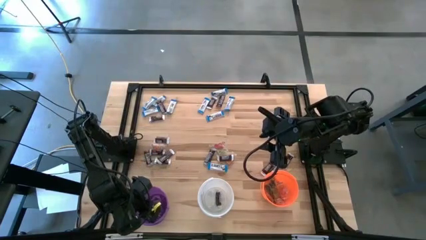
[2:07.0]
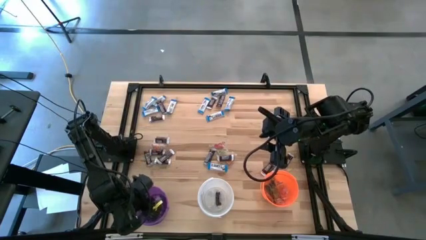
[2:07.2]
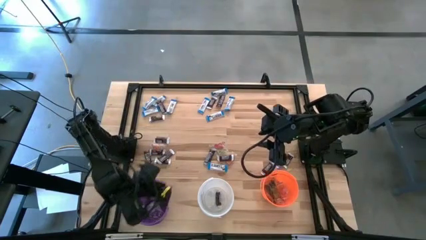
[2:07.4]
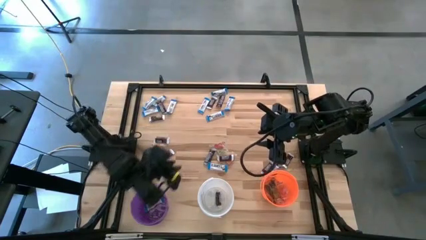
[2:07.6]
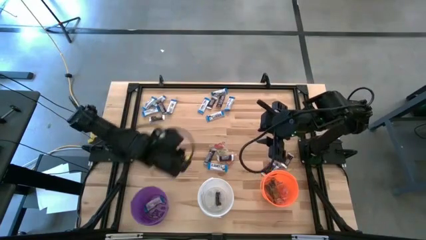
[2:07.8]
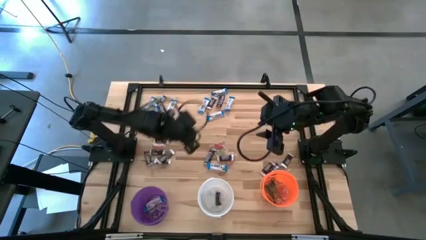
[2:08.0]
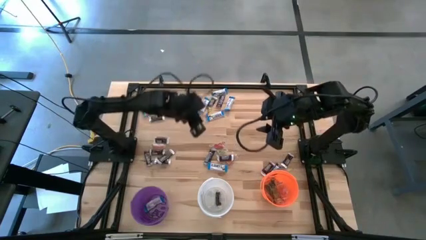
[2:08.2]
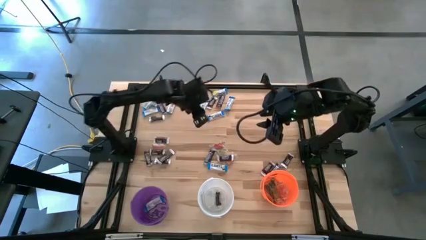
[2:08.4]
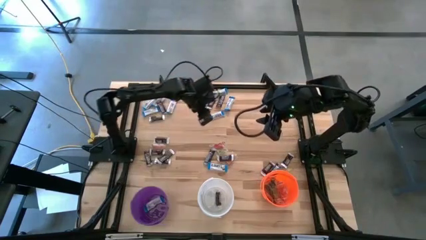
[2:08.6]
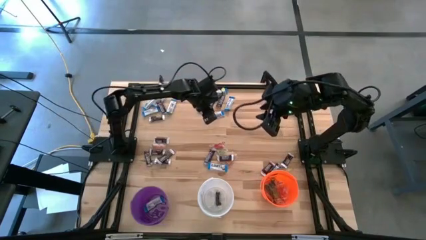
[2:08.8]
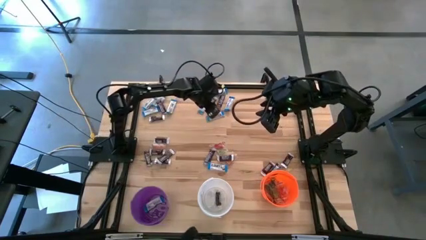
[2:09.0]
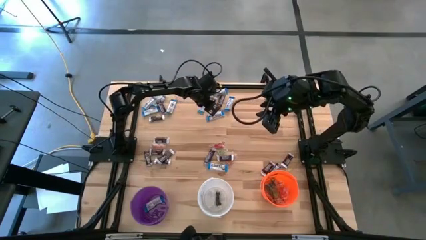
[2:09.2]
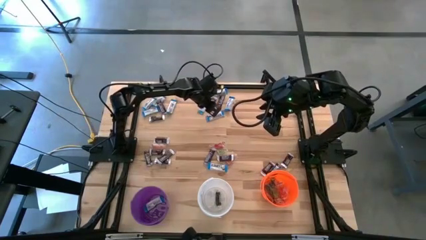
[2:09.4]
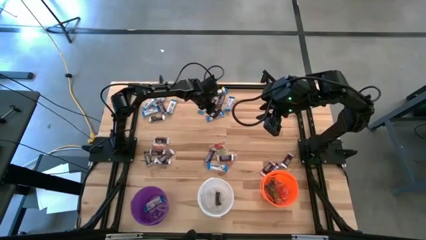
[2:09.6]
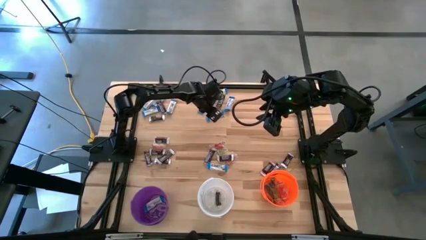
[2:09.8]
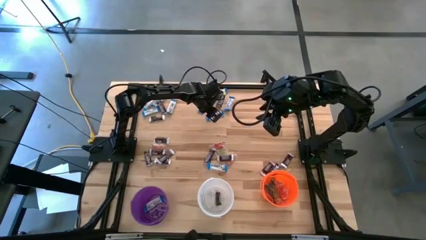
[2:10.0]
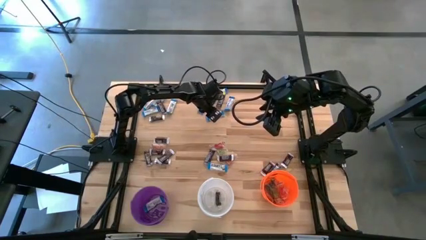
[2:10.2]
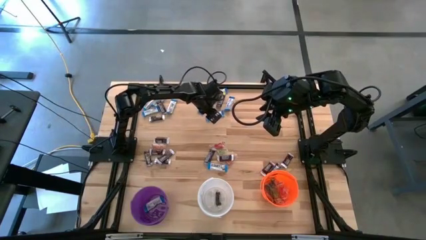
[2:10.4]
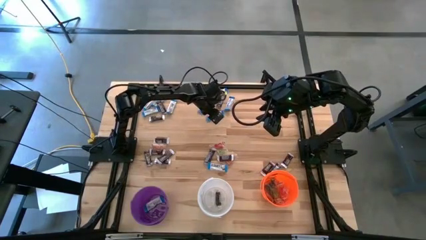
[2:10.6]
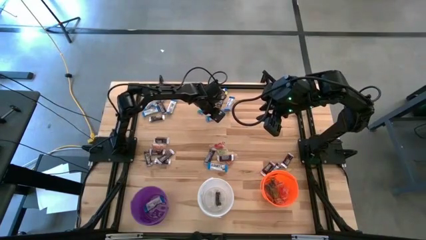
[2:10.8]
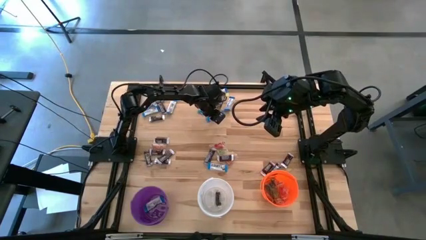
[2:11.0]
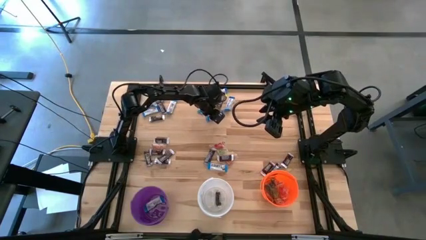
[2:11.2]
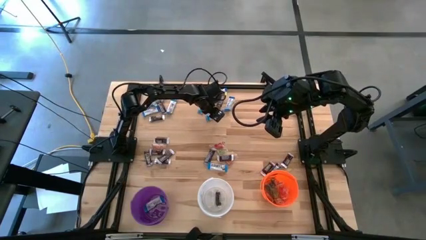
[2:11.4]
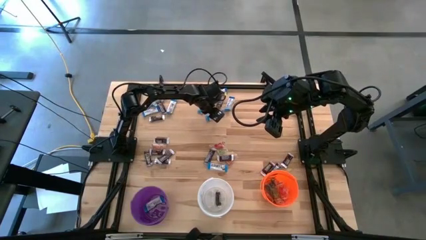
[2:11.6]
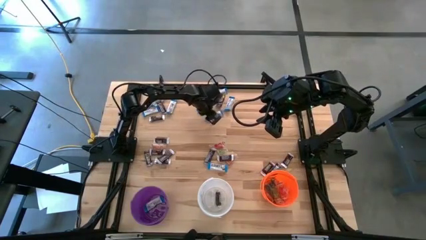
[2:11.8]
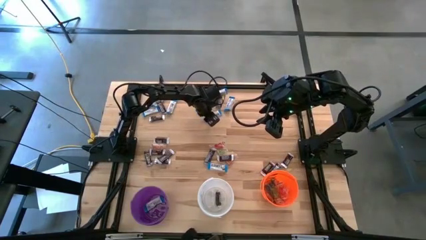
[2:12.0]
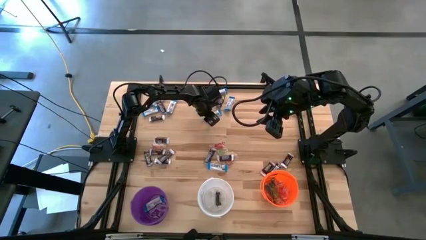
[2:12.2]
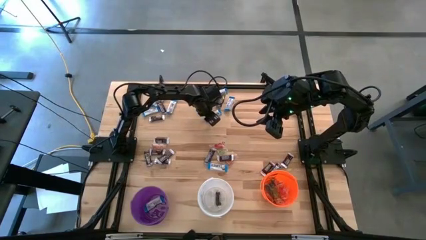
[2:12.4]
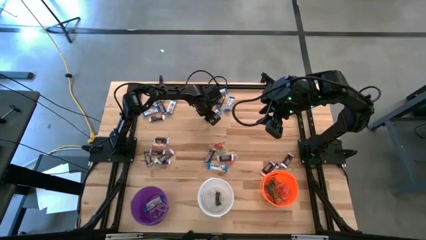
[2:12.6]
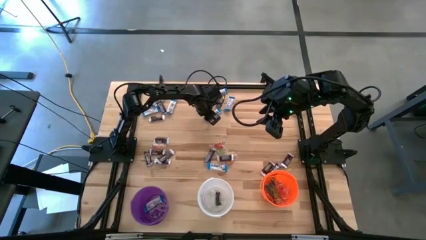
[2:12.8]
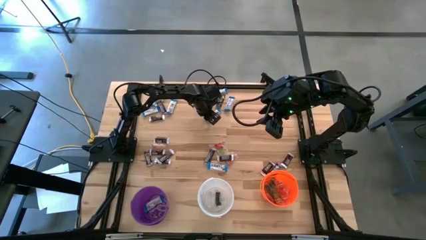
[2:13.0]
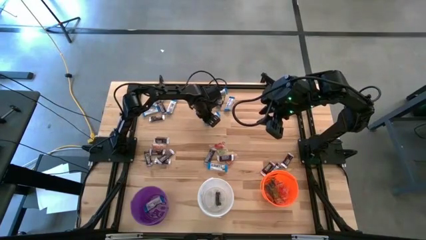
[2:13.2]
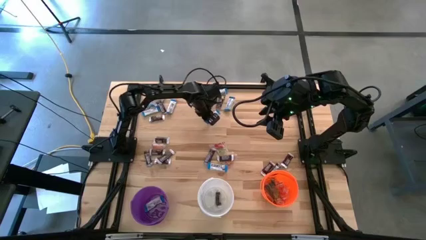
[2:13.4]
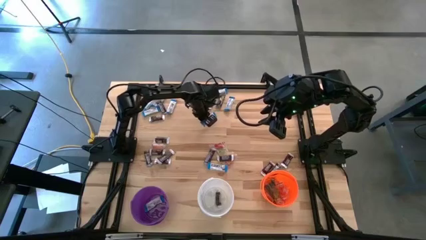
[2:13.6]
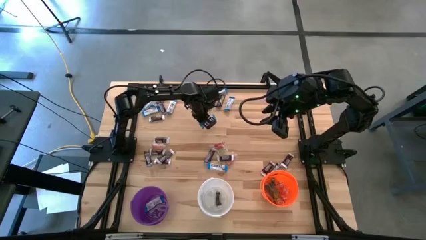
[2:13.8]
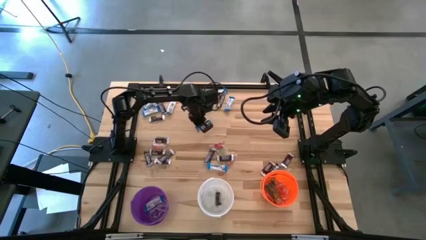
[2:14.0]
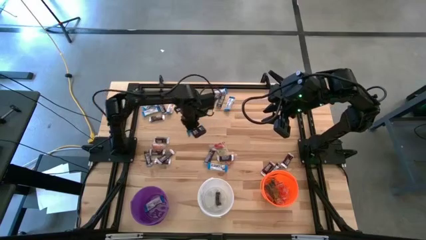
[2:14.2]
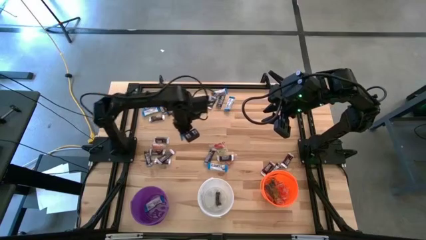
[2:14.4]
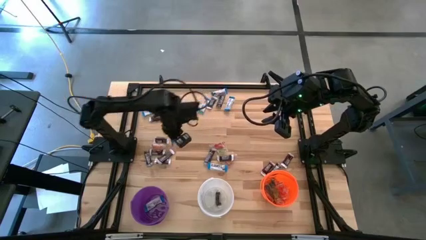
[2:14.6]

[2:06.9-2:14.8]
Task: Sort candy
Put the white chocolate into the violet bucket

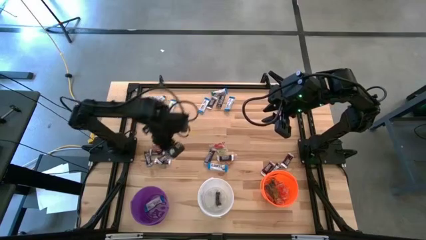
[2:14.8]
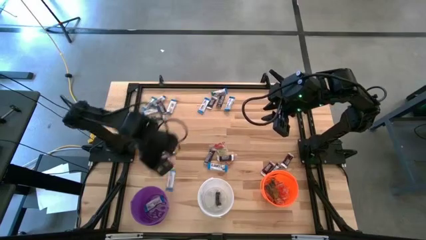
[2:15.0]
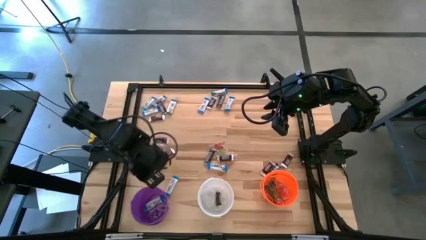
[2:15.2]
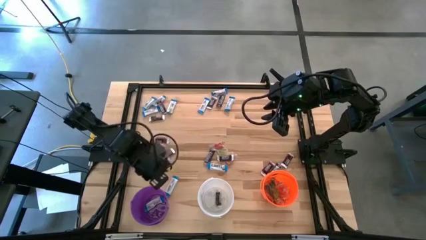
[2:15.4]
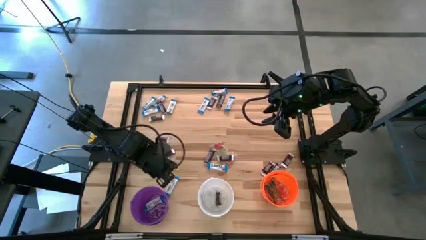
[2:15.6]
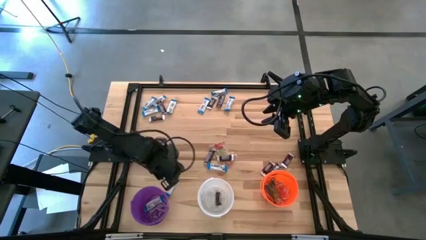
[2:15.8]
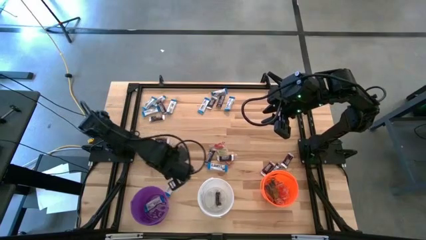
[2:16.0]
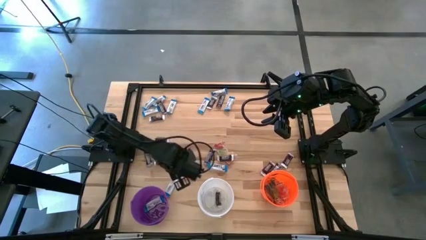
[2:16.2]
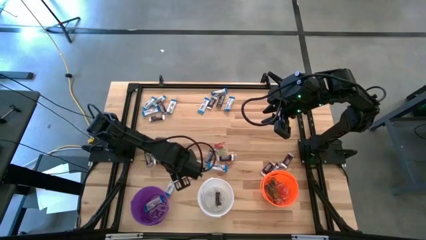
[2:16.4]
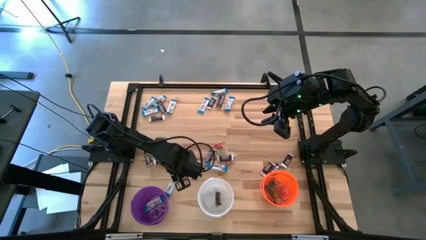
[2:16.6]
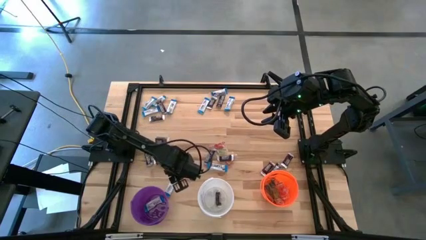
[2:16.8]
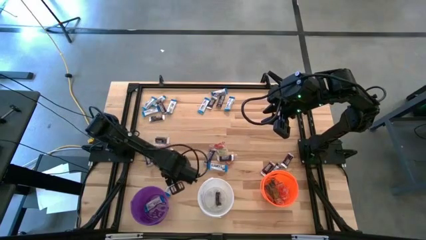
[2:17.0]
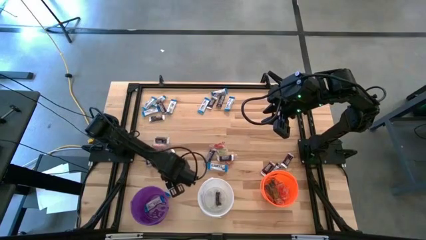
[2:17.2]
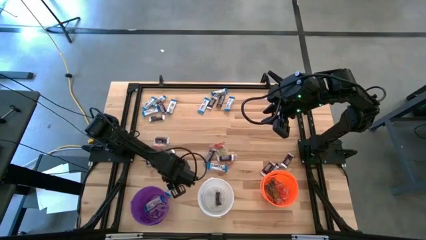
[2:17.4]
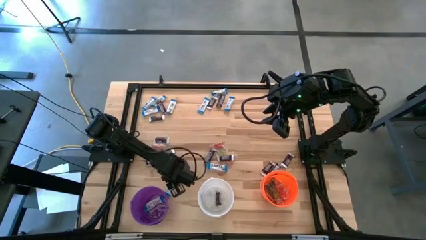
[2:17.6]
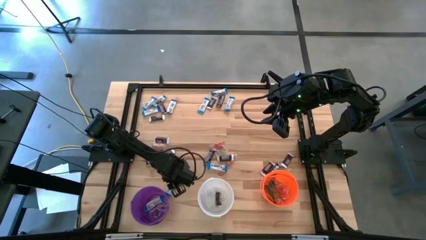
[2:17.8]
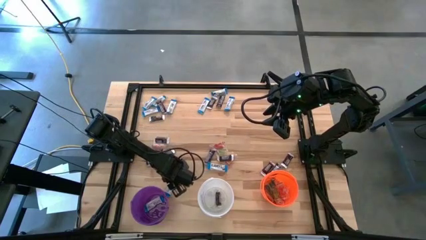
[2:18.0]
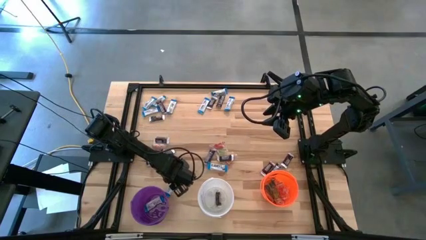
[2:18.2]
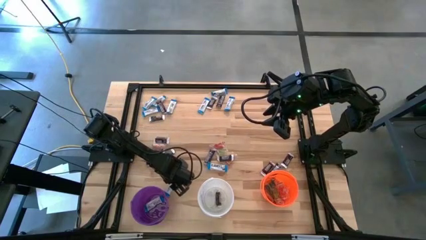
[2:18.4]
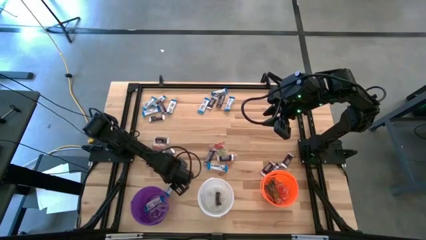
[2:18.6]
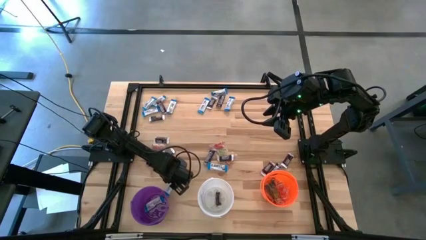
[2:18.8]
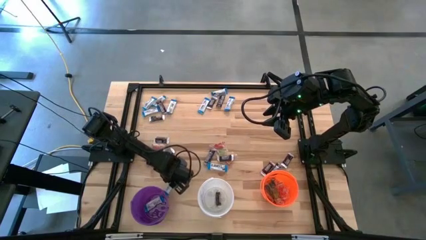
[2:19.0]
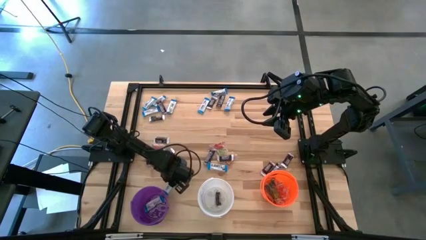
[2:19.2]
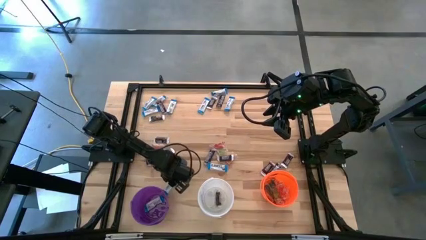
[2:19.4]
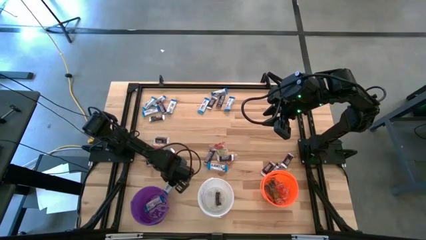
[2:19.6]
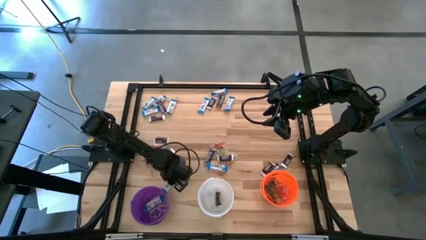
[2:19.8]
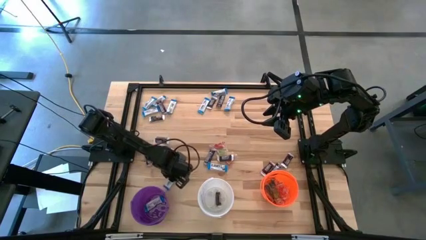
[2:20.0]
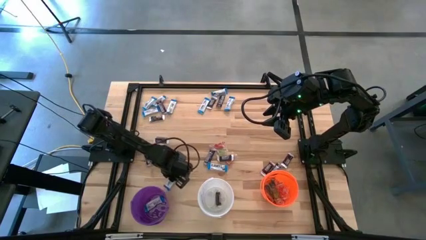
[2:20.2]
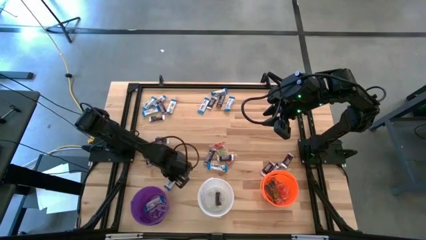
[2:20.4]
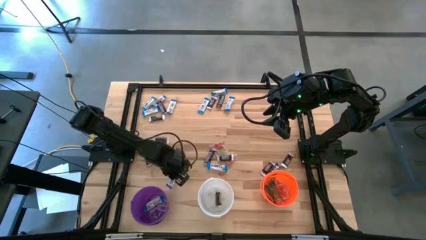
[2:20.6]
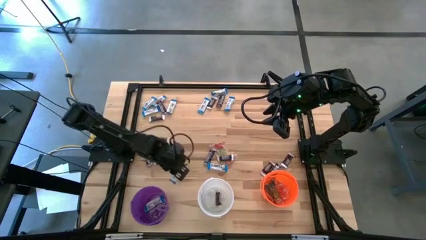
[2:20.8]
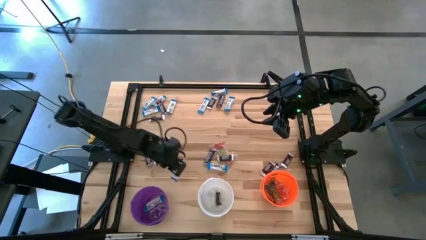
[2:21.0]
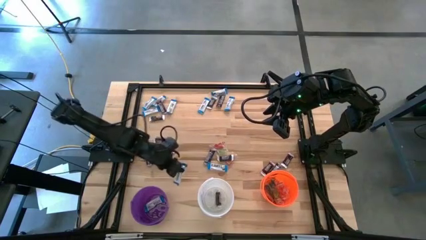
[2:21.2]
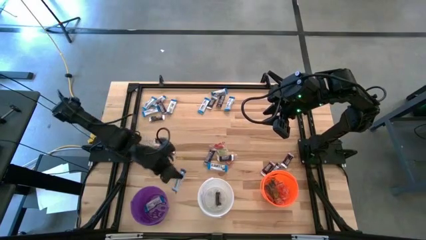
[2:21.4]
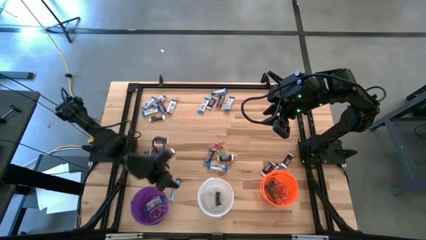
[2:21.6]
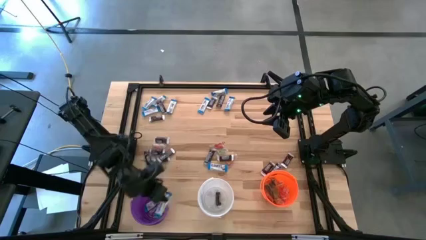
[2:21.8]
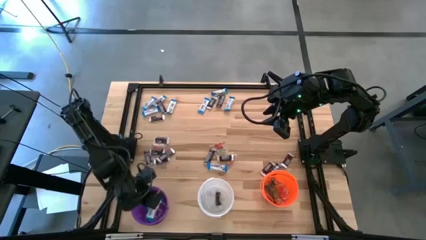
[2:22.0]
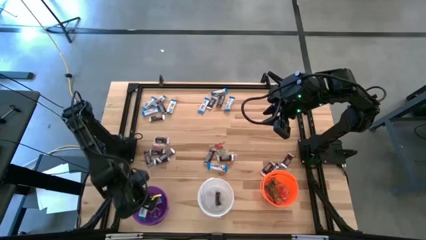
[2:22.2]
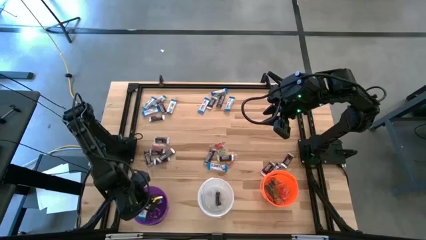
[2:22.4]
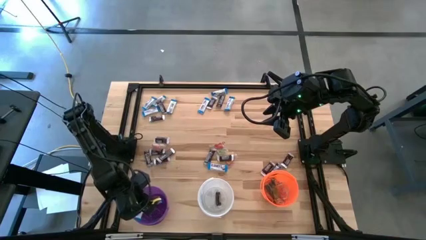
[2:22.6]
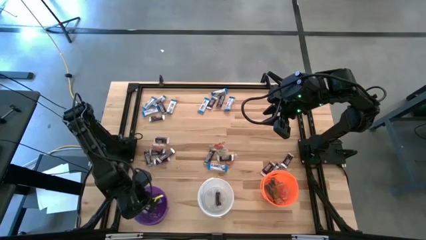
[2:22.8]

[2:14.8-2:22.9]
Put the white chocolate into the violet bucket
